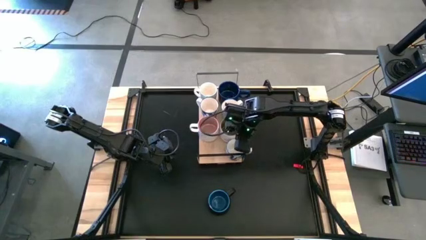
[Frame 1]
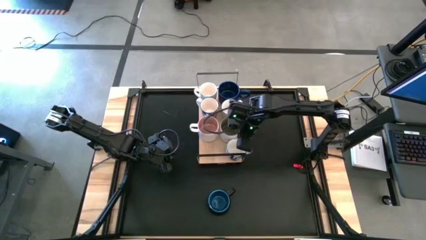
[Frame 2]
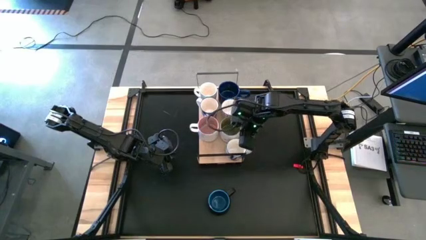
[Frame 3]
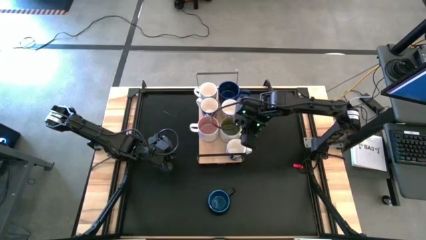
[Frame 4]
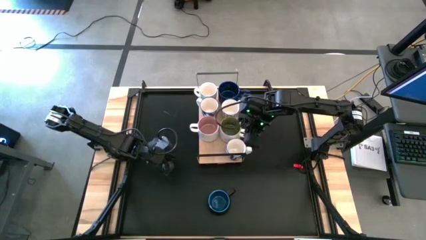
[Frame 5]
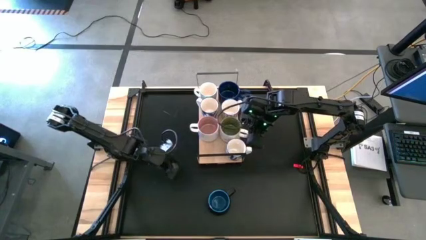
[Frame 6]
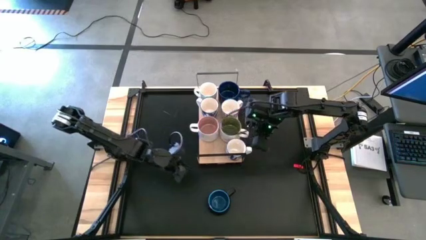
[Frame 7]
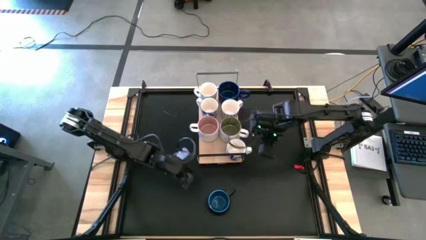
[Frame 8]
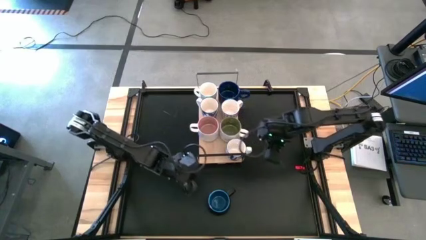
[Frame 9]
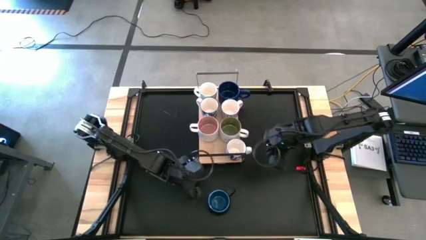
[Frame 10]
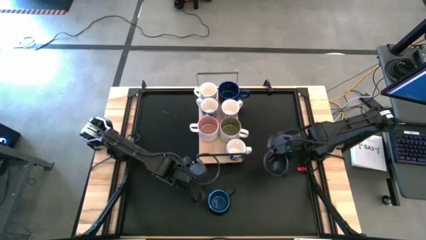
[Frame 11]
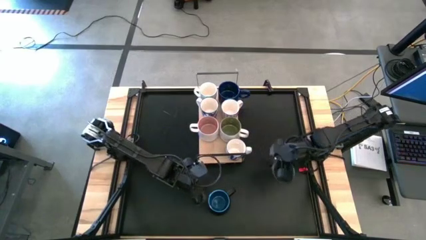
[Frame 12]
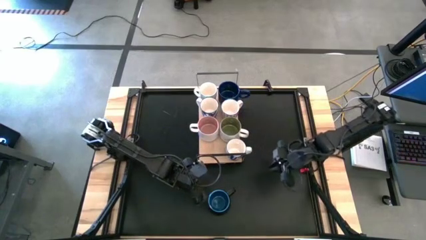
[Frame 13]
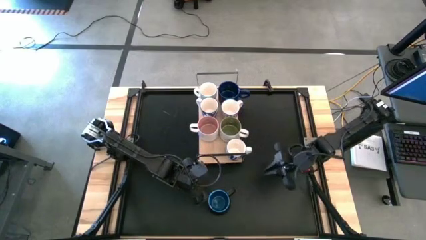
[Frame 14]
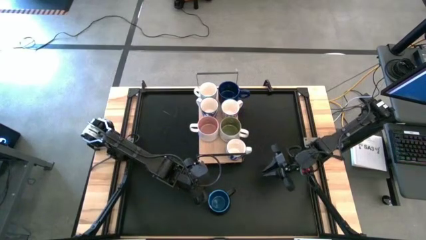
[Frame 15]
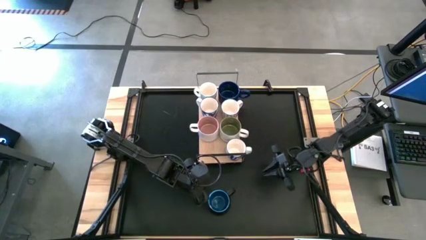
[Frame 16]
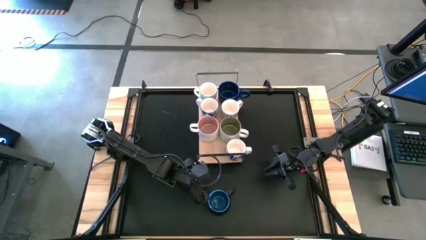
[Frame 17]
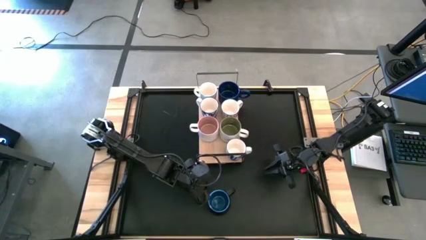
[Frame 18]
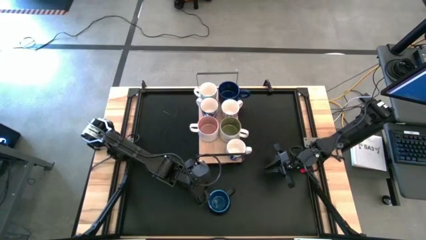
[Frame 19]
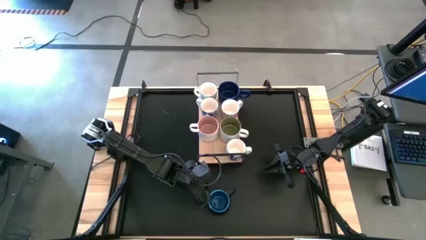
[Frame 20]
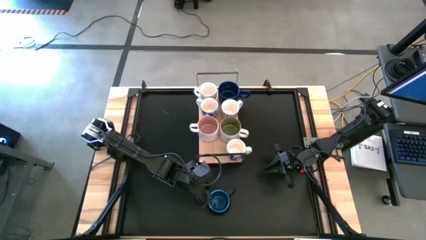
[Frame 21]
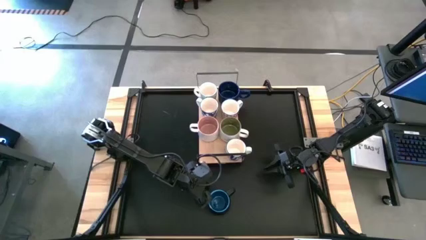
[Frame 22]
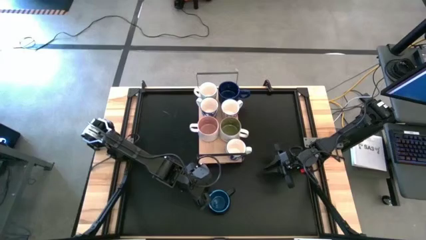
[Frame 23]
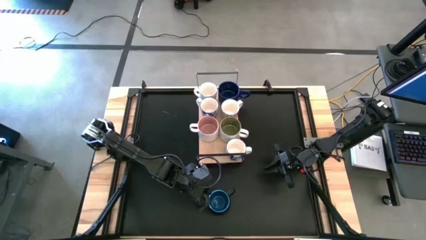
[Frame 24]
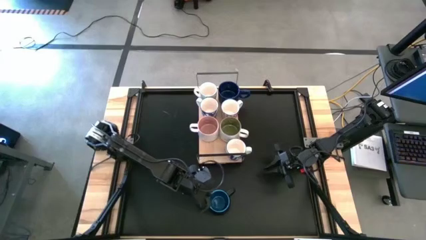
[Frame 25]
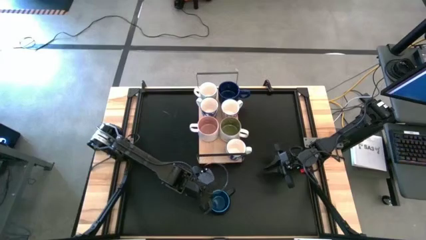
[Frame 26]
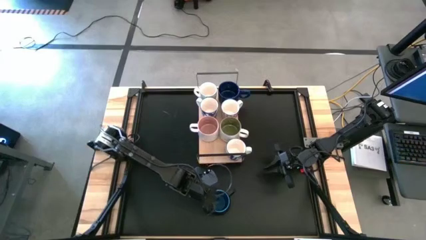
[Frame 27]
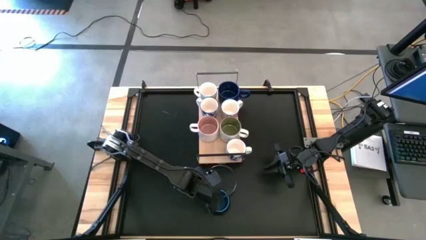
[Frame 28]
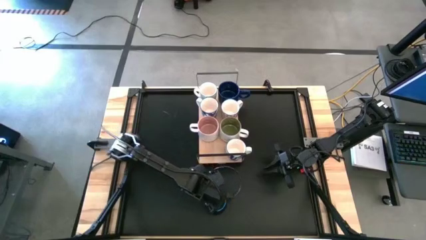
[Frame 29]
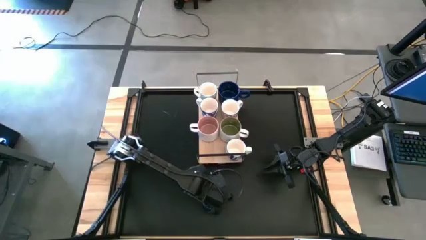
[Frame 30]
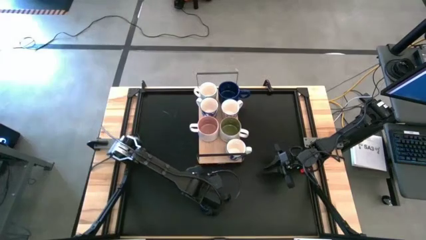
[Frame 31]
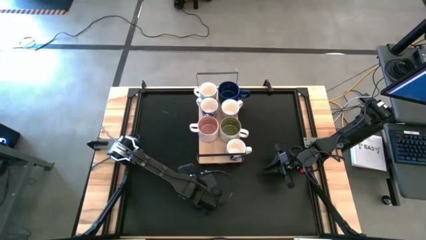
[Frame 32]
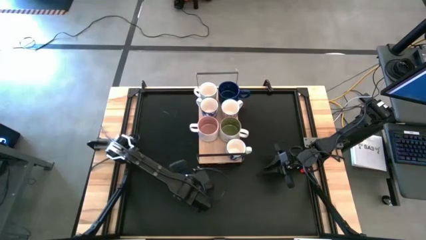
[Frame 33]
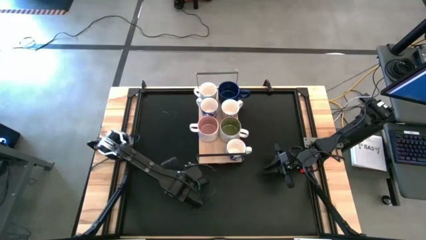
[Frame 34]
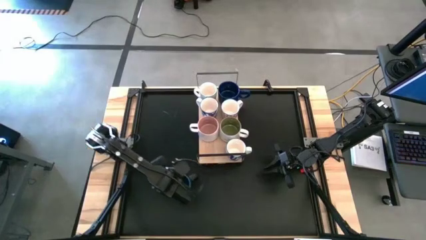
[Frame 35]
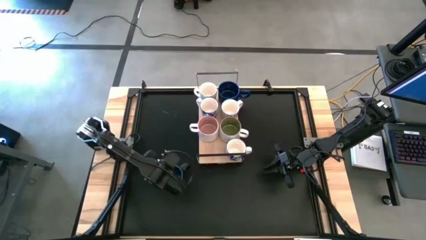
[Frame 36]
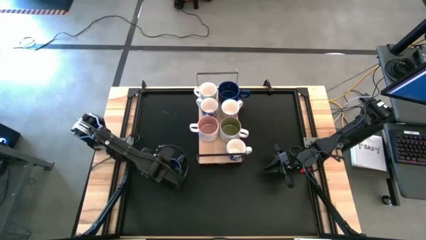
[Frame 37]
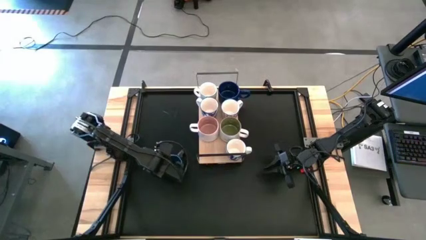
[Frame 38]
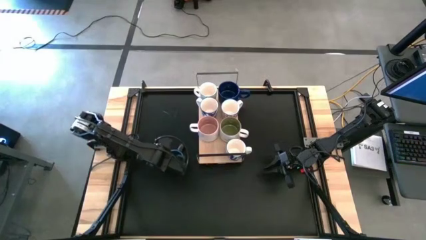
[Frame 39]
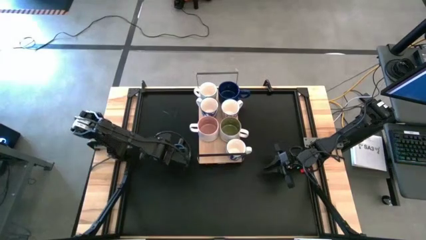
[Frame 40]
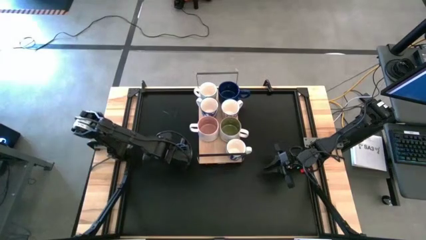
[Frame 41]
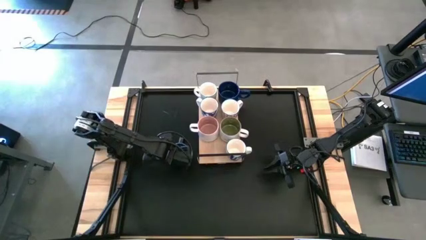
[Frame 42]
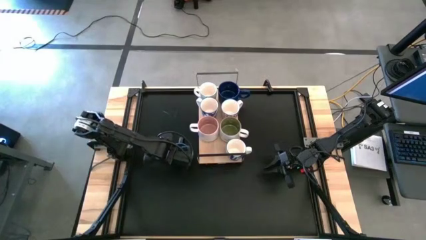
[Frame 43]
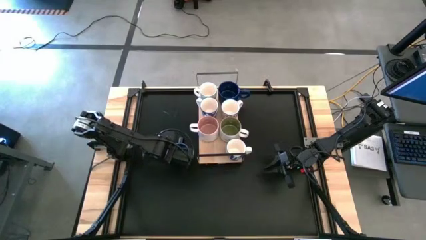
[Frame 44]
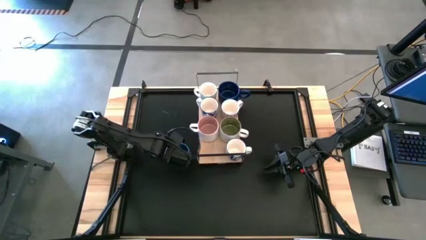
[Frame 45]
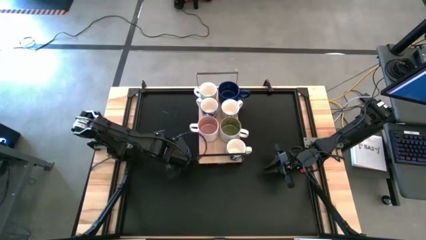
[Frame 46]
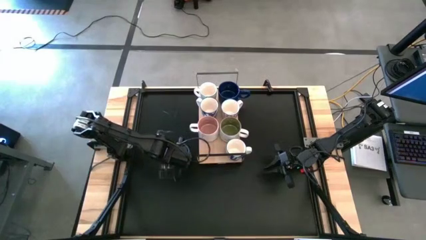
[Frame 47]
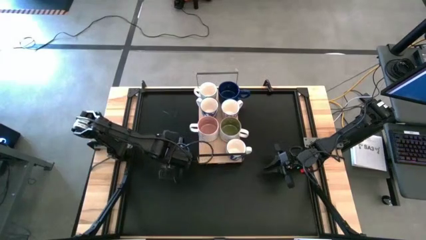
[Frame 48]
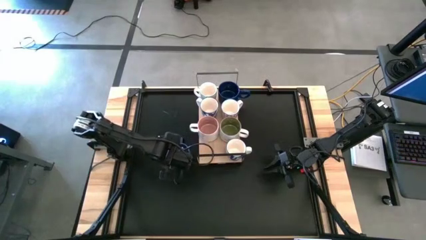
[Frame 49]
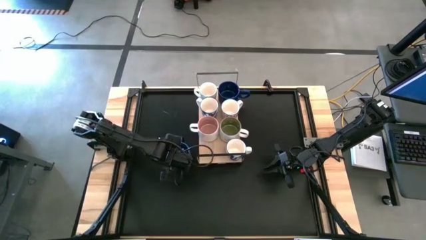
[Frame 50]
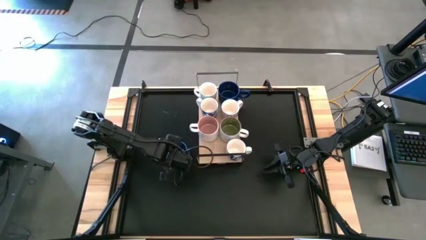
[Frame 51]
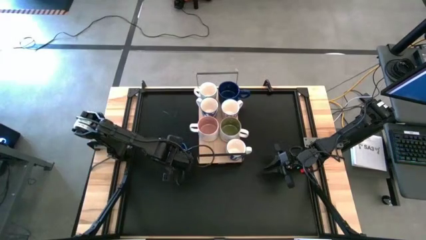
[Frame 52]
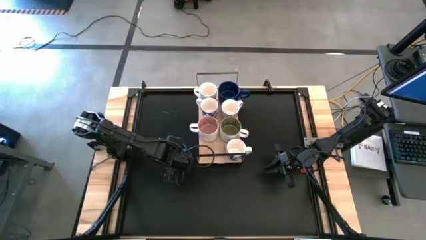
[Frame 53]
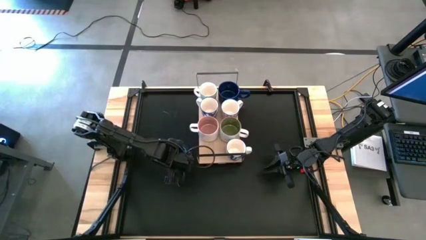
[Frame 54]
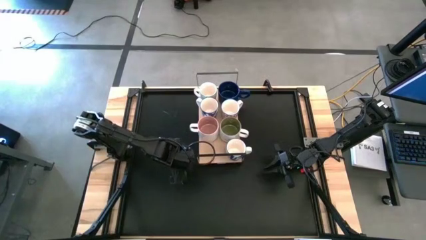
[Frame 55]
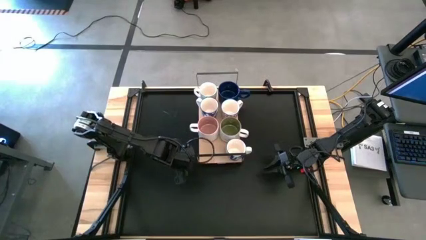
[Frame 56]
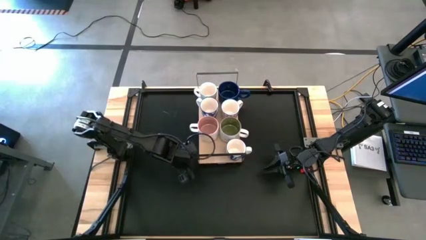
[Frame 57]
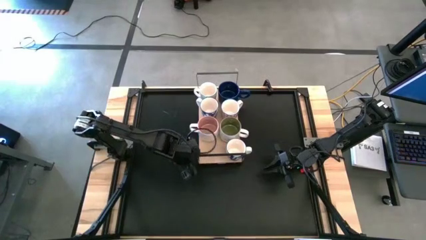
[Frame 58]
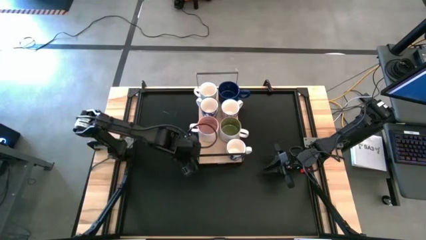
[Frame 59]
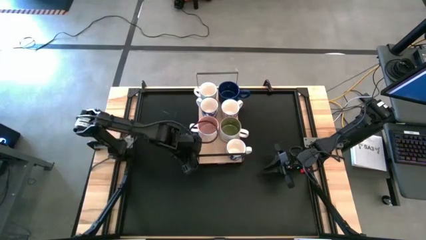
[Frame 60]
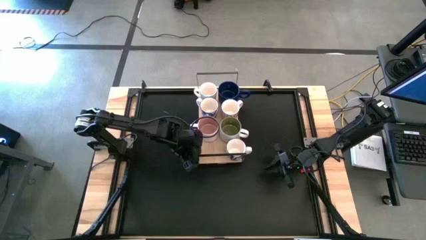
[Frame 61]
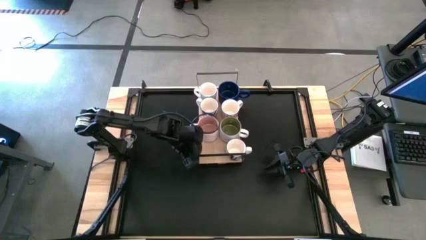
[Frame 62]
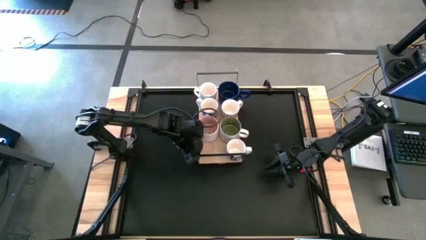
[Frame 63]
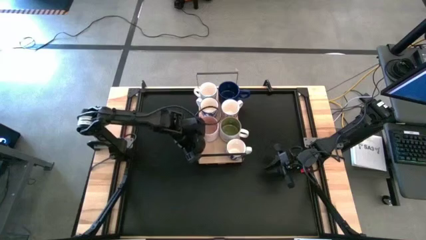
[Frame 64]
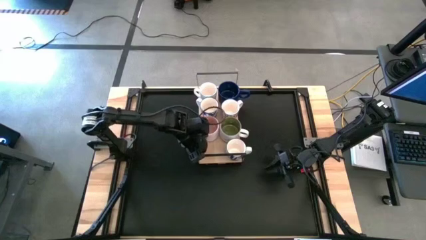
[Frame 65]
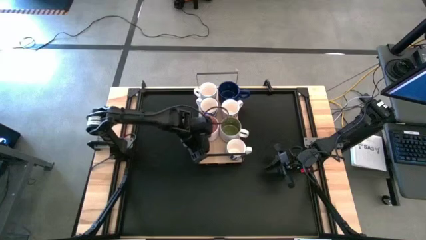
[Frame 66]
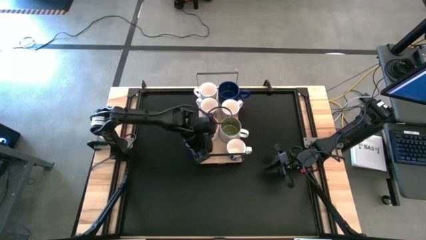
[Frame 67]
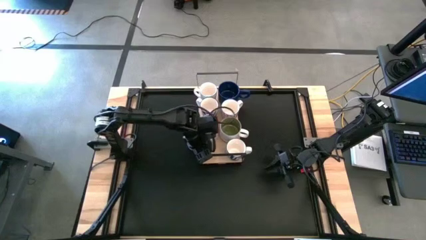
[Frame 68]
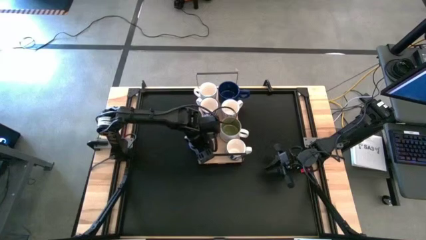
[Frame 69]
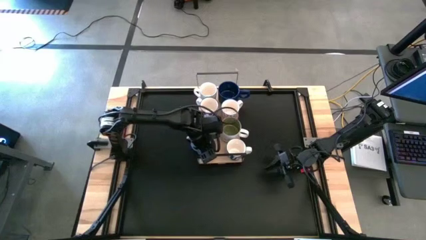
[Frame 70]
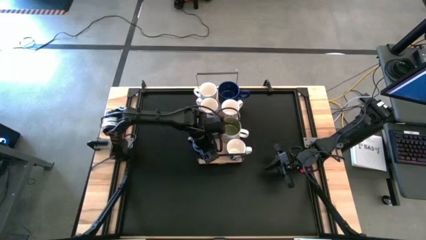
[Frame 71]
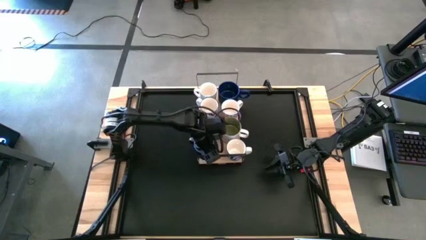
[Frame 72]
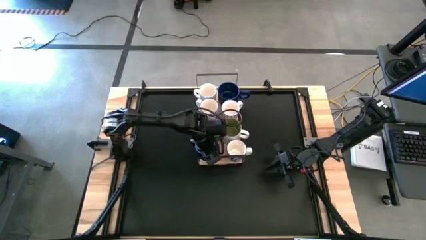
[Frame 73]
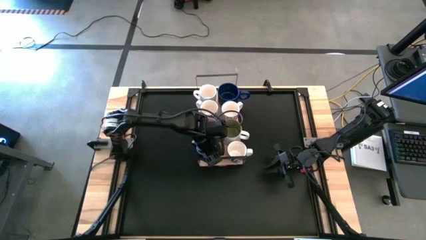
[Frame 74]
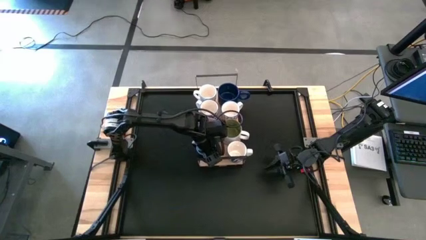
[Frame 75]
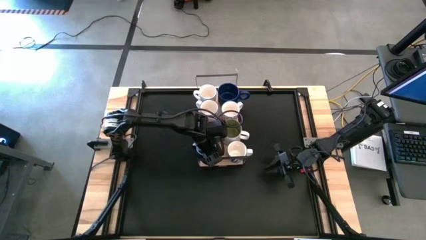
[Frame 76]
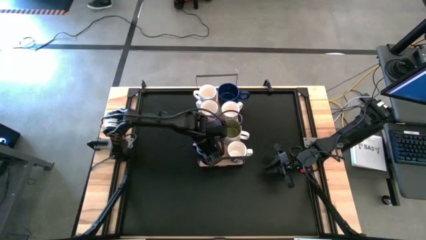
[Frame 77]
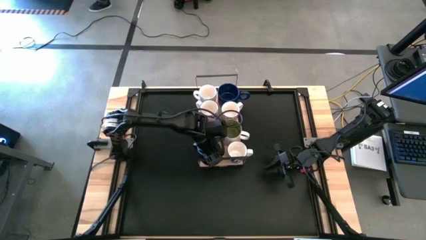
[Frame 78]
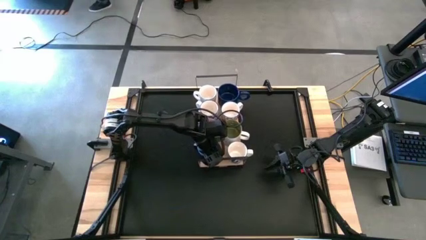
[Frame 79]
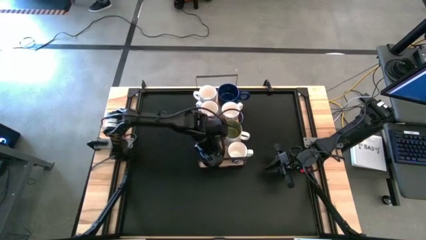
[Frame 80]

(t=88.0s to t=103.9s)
Task: Place coffee mugs
Put the black mug on the shelf

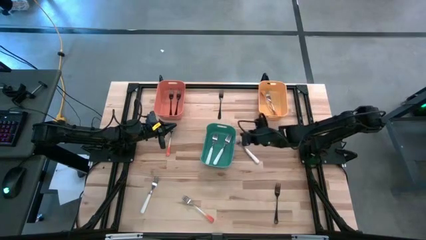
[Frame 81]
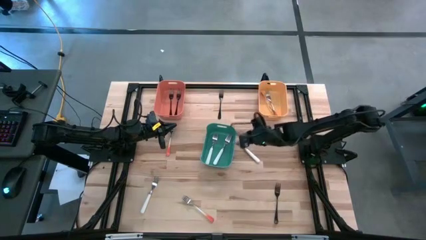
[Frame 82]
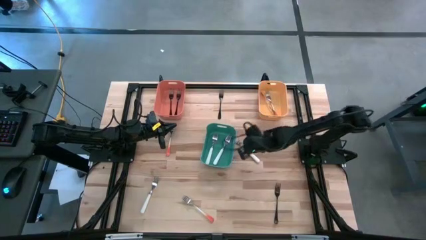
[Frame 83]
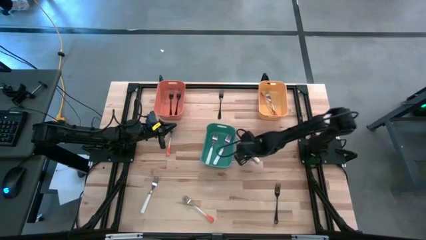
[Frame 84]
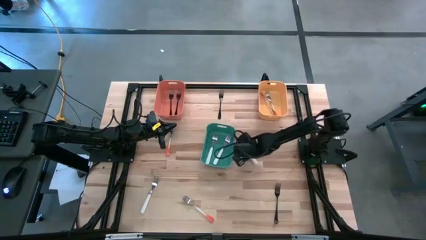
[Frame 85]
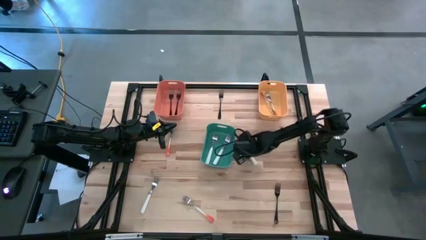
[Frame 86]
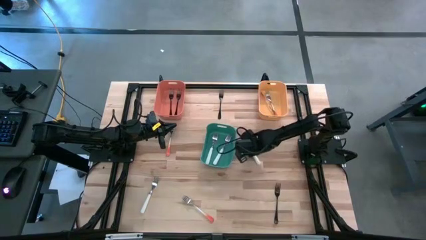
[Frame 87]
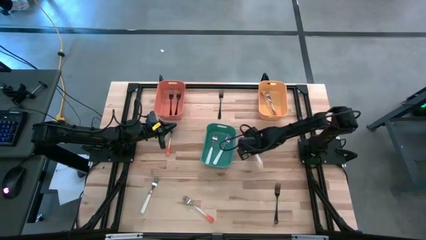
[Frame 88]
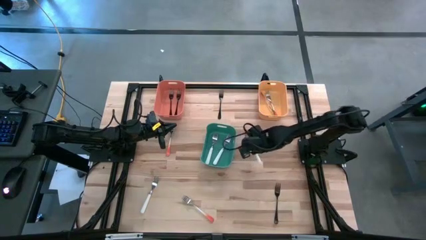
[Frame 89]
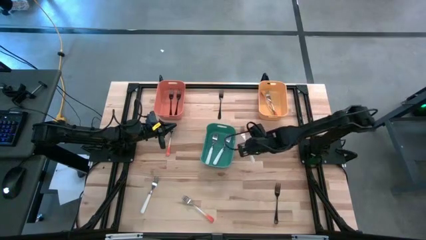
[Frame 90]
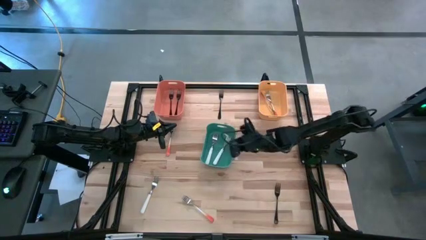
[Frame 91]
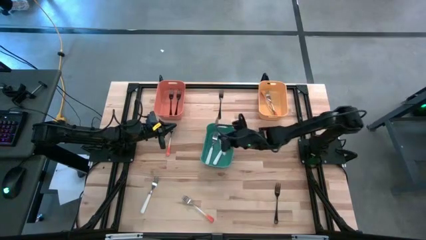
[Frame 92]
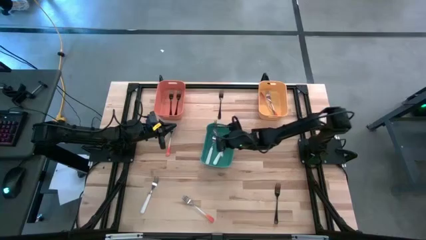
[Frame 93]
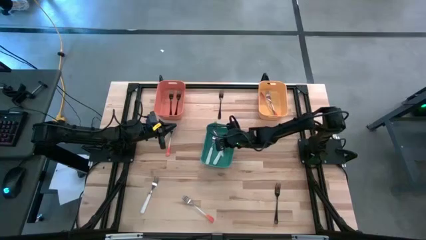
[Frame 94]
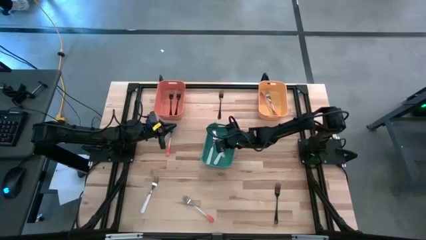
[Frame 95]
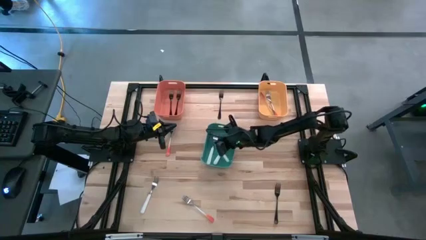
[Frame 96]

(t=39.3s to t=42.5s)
Task: Sort silverware by color (type)
Put the top white fork into the green bin
